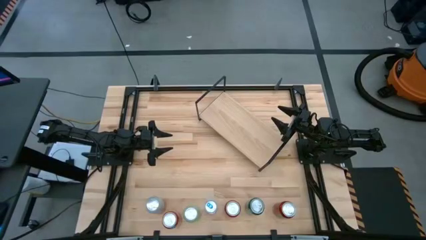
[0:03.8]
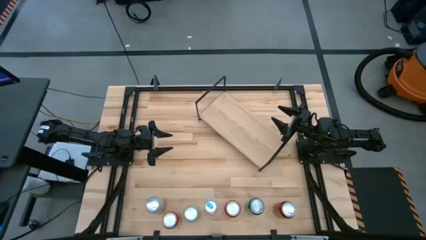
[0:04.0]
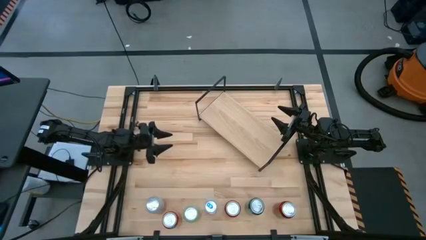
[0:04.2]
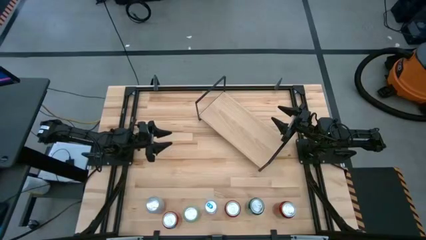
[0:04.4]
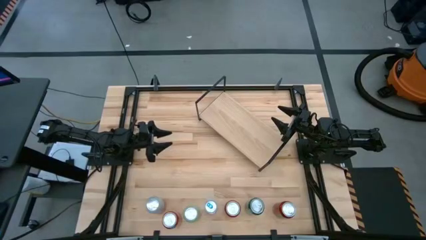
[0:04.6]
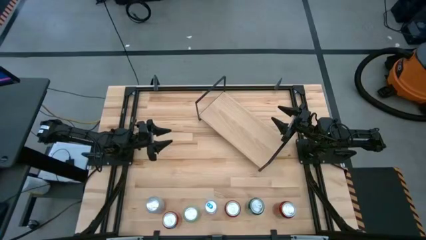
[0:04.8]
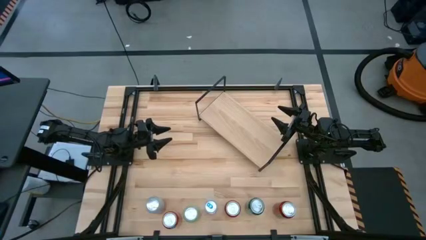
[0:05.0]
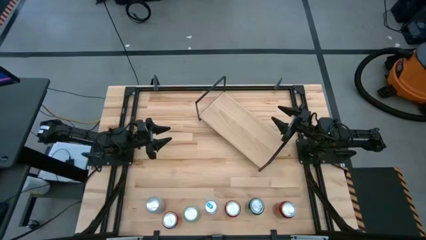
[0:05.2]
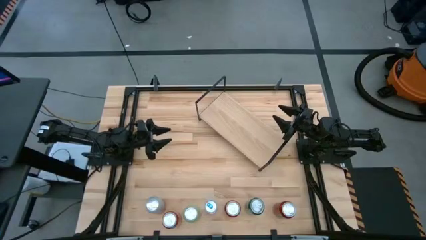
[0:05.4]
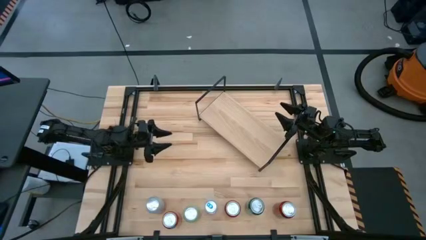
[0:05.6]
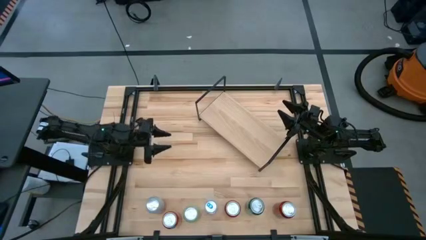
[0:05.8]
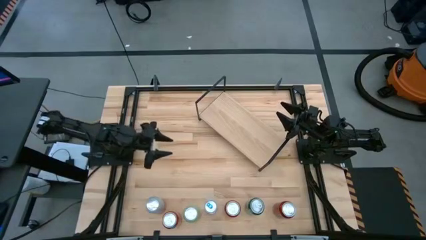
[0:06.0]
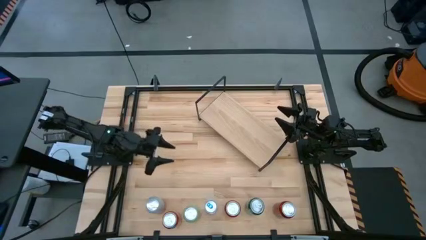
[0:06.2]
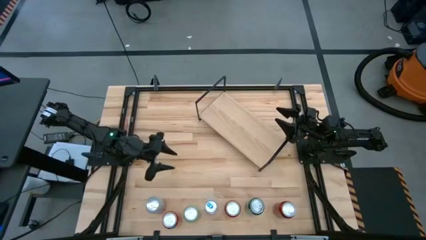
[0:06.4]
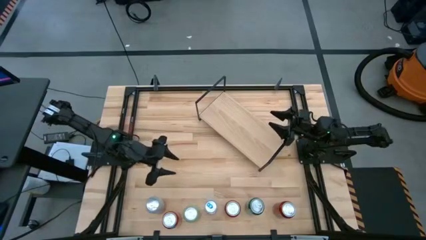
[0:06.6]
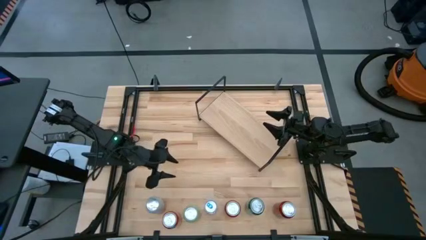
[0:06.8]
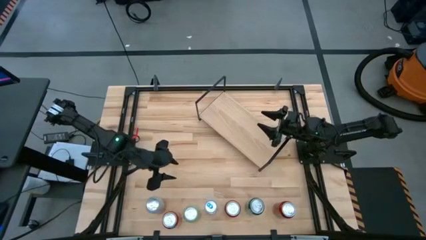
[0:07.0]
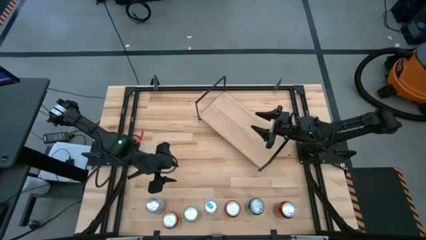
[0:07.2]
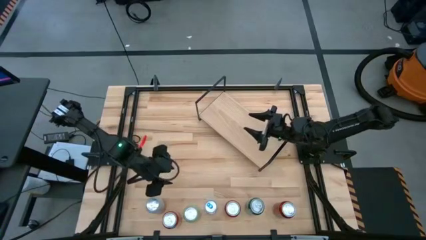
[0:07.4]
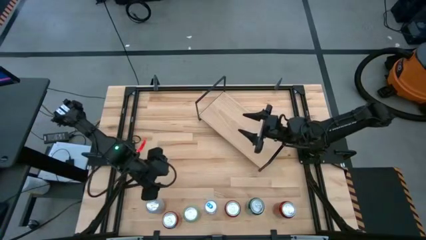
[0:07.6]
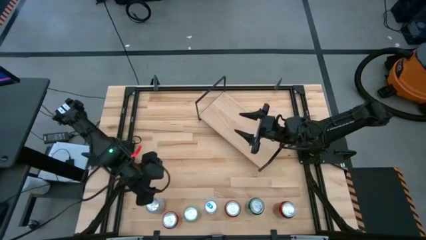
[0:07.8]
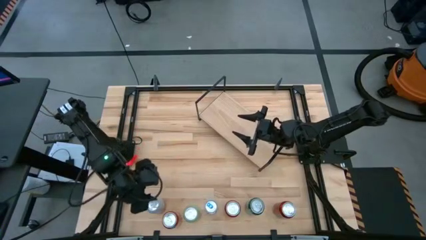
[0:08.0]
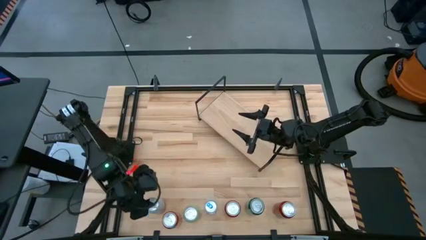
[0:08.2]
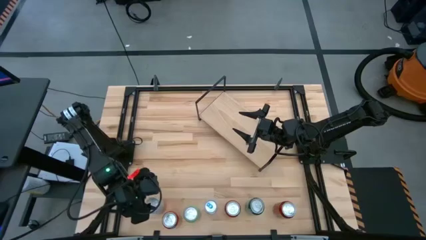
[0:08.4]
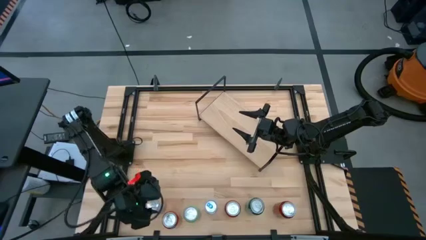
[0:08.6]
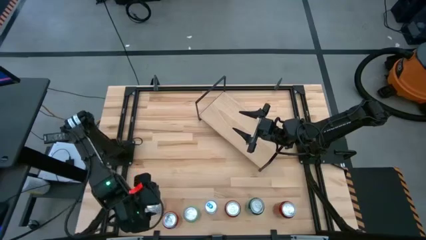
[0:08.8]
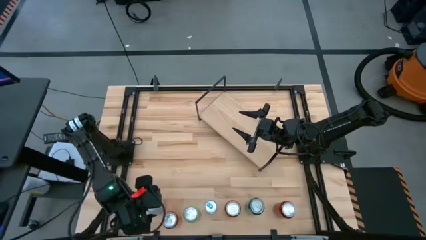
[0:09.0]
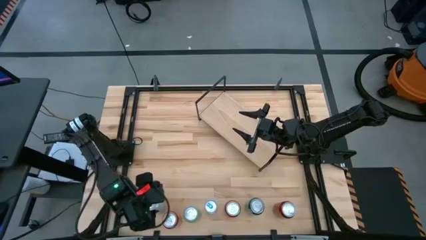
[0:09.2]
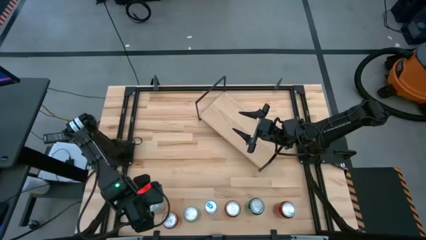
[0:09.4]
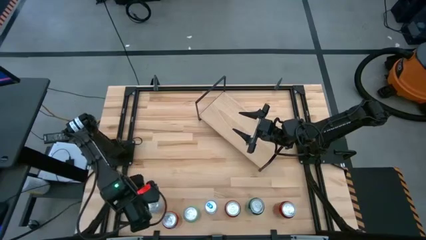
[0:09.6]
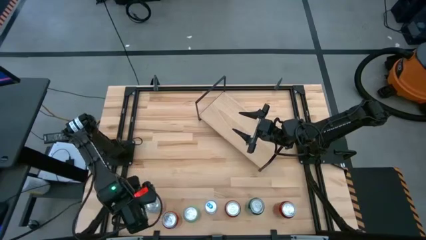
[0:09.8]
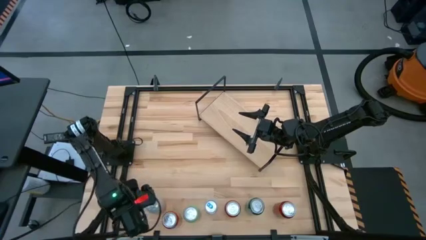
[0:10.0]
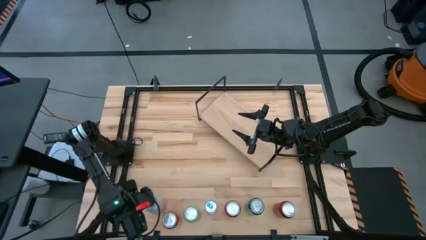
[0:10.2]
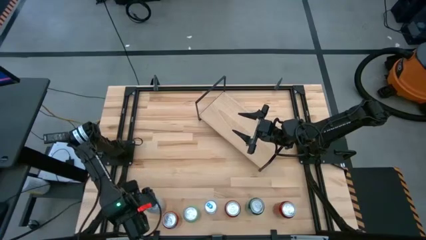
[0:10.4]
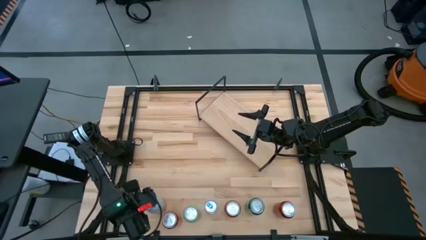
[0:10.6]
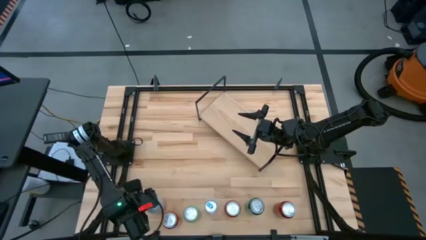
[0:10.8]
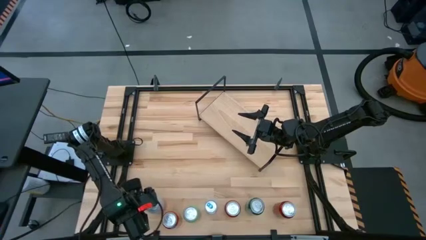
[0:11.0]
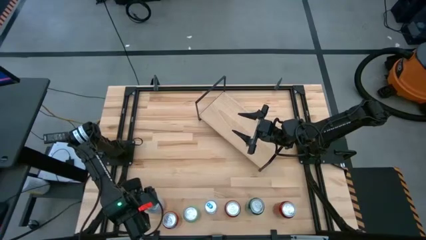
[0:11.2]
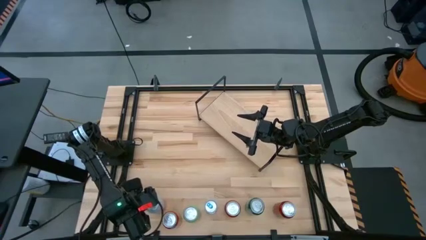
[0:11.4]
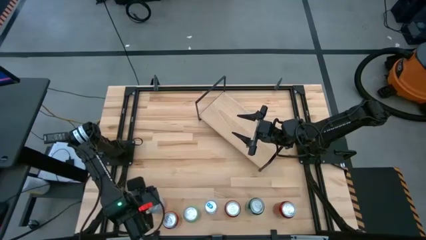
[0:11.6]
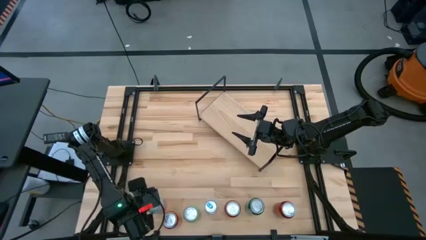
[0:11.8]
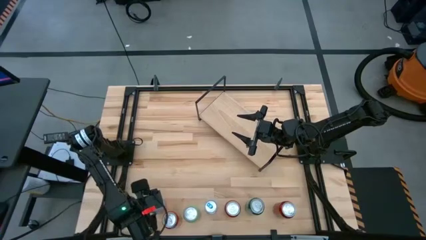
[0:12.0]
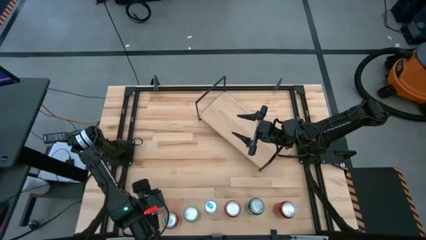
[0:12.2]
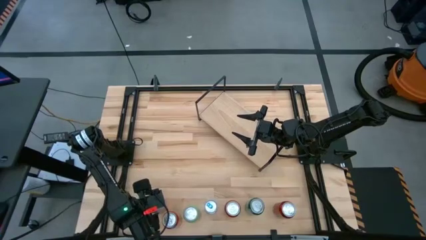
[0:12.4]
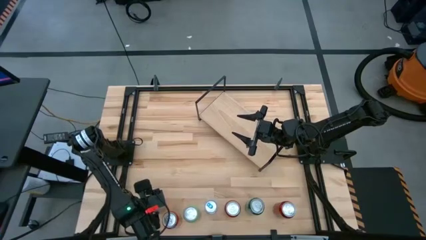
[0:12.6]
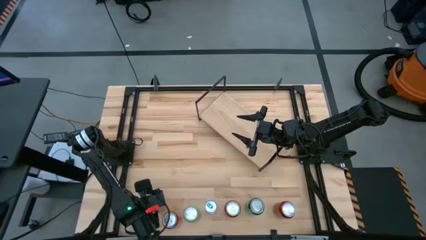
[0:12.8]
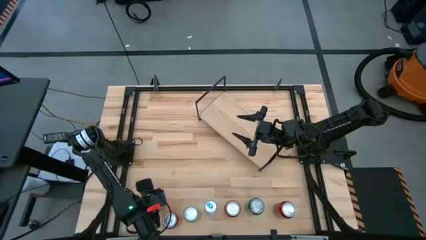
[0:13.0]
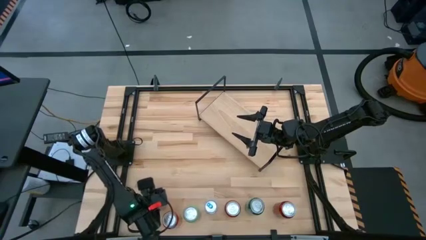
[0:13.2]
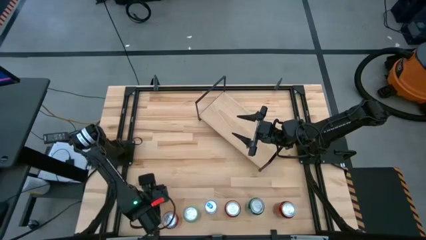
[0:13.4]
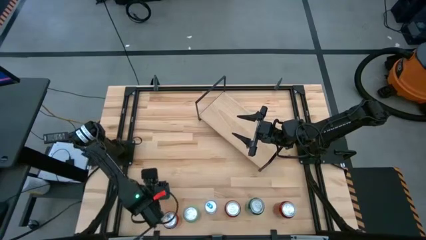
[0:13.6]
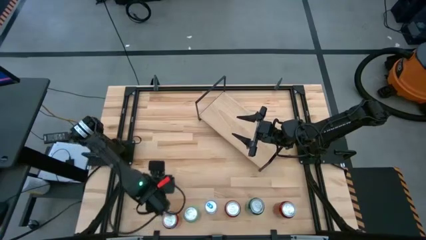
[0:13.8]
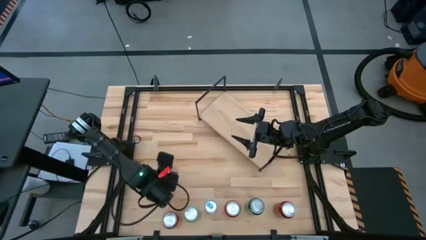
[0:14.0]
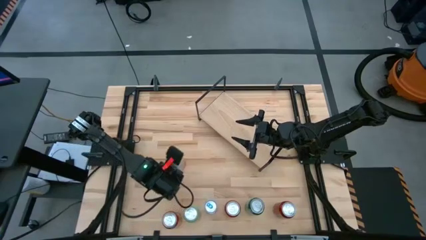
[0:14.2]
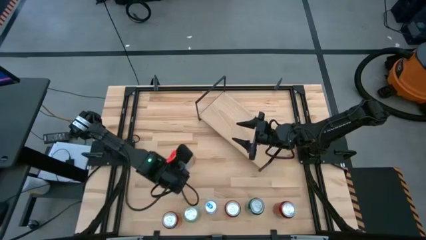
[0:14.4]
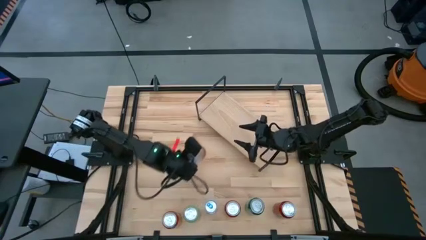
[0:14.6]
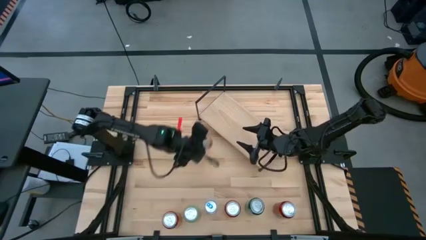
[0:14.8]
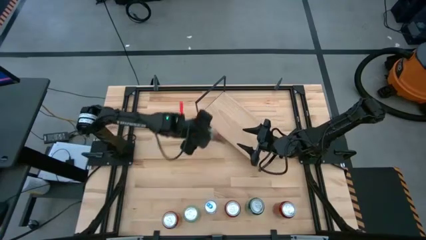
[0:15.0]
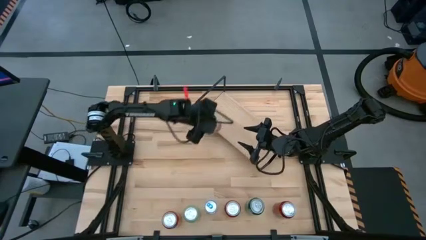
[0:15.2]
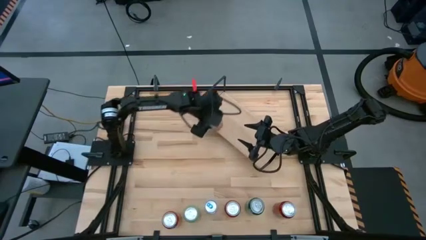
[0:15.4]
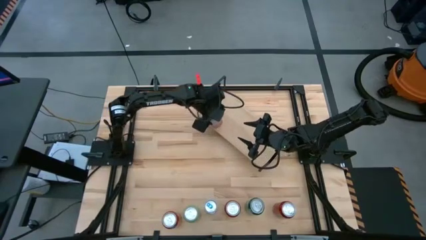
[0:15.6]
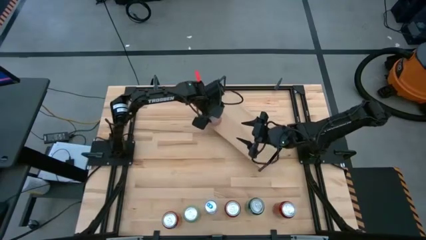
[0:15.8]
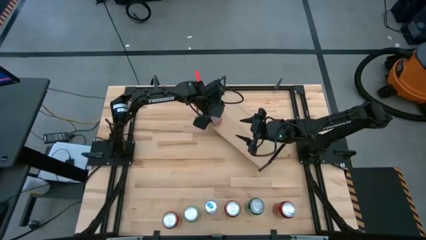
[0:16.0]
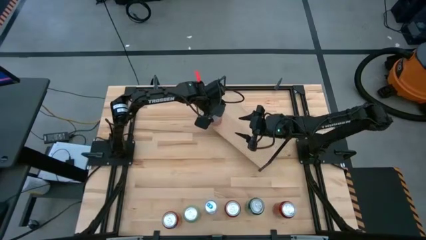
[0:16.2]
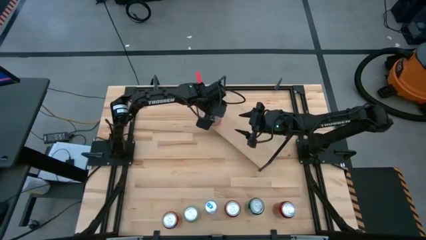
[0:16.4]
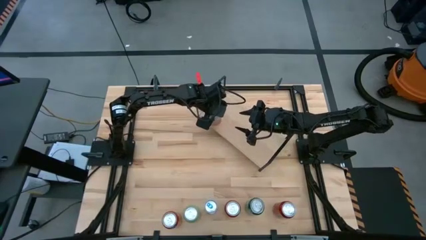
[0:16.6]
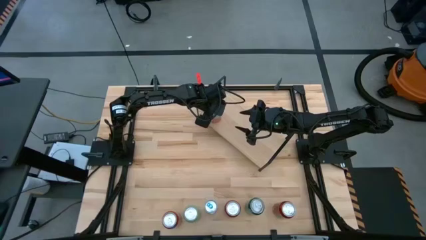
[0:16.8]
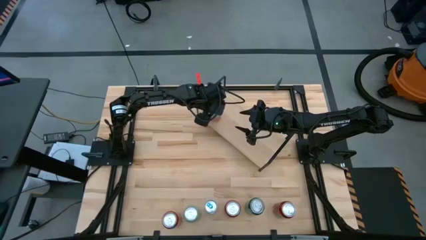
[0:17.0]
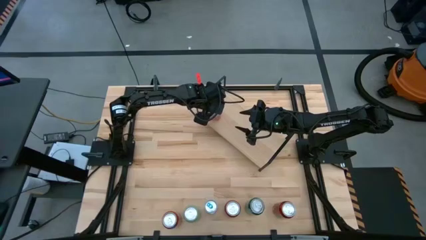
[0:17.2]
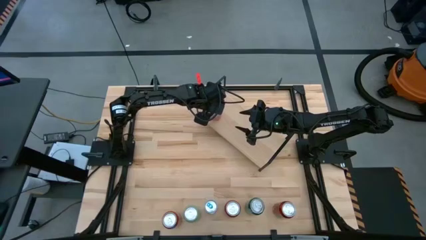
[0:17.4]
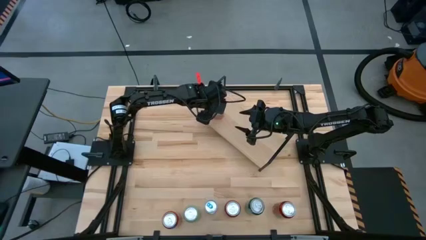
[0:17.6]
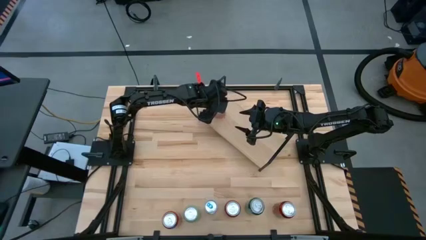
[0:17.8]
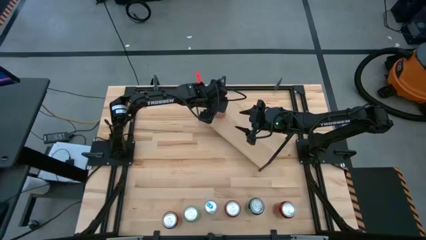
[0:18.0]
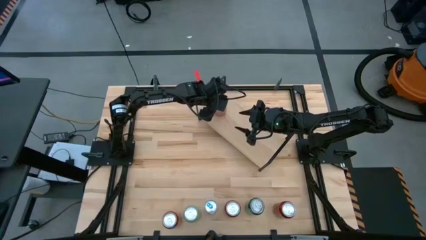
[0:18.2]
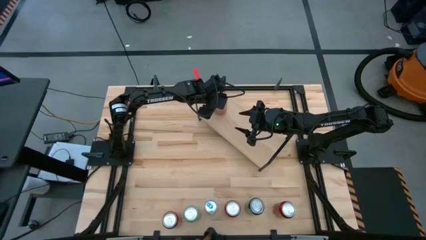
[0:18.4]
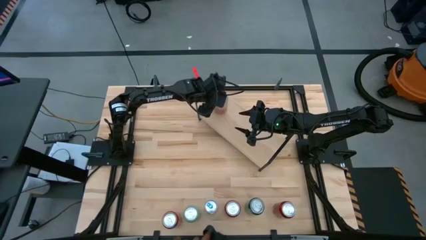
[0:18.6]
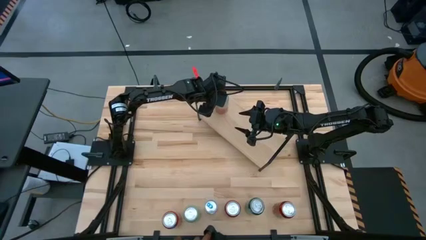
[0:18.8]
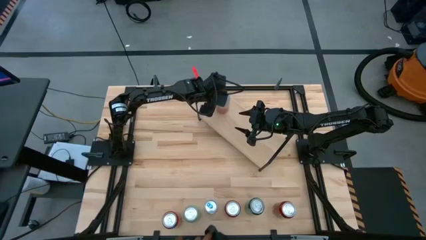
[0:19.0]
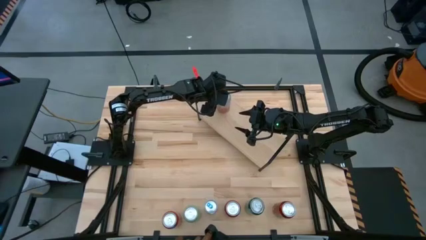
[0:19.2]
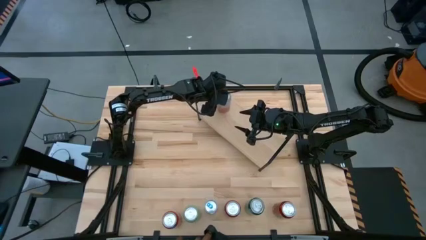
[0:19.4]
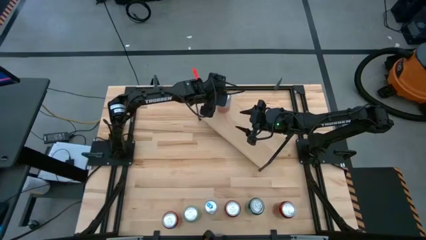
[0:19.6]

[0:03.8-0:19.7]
Task: Place canned beverage on shelf
Put the white soda can on the shelf
